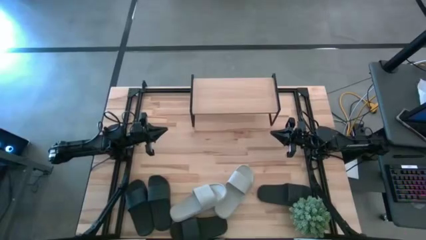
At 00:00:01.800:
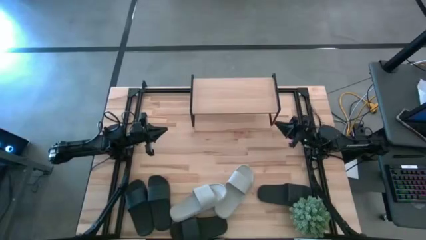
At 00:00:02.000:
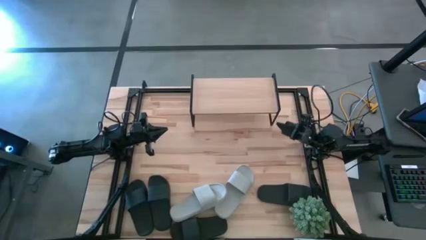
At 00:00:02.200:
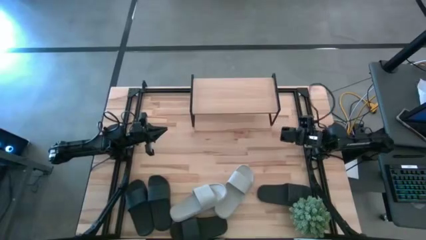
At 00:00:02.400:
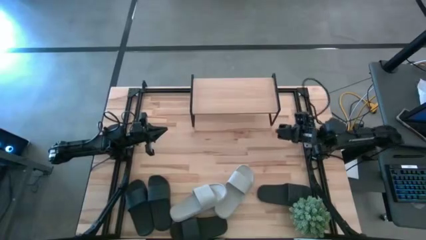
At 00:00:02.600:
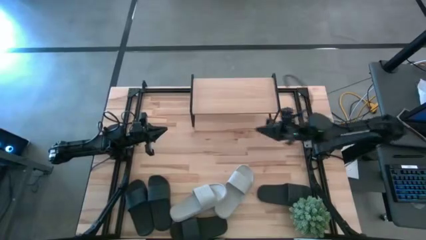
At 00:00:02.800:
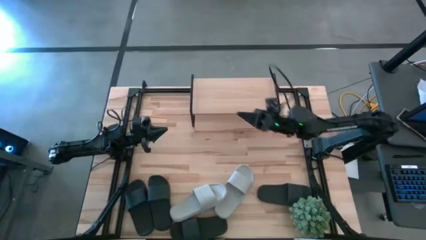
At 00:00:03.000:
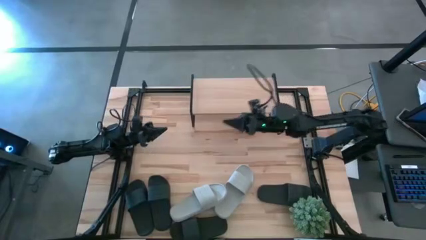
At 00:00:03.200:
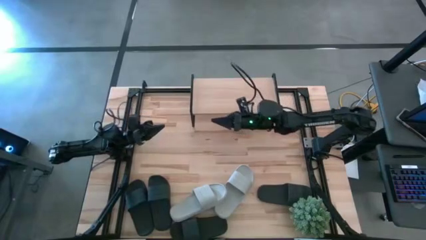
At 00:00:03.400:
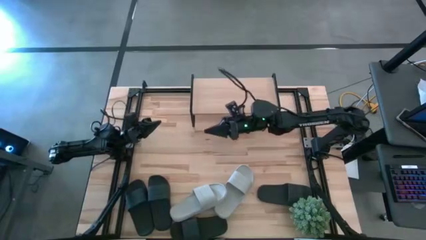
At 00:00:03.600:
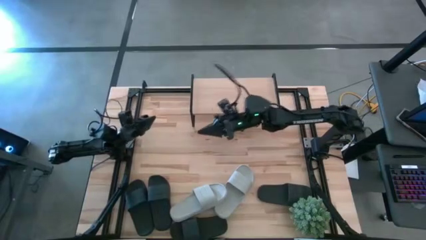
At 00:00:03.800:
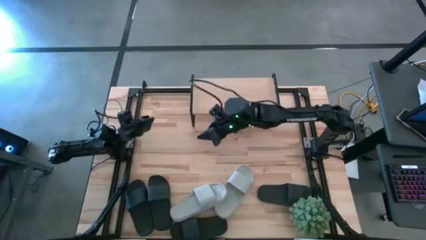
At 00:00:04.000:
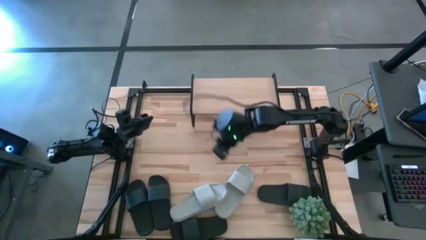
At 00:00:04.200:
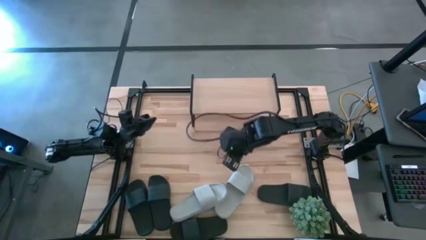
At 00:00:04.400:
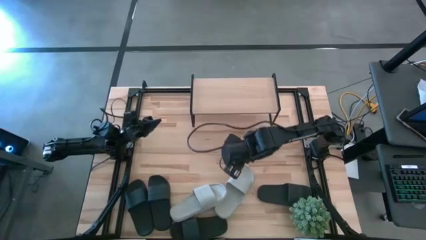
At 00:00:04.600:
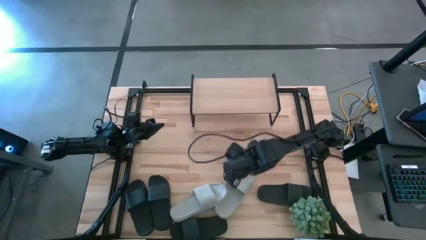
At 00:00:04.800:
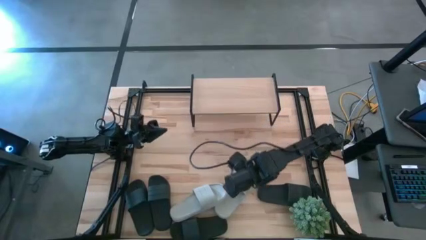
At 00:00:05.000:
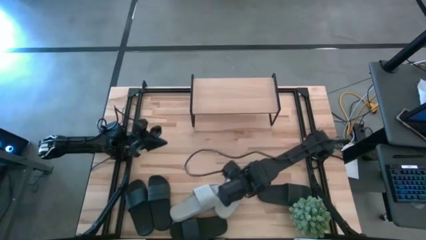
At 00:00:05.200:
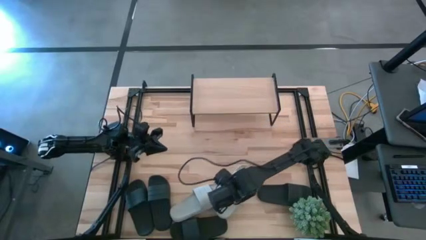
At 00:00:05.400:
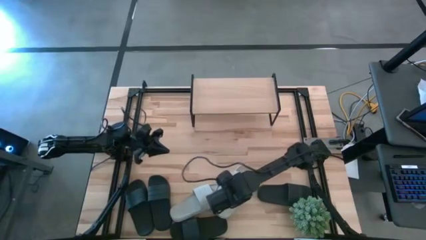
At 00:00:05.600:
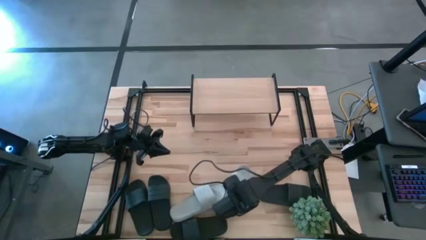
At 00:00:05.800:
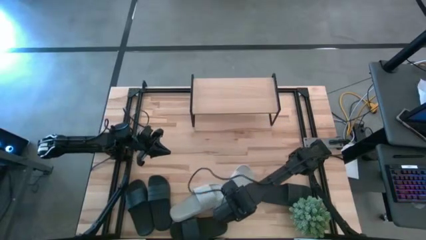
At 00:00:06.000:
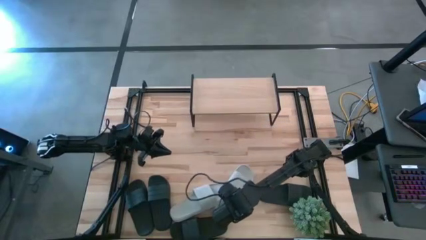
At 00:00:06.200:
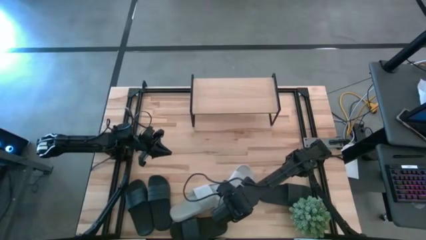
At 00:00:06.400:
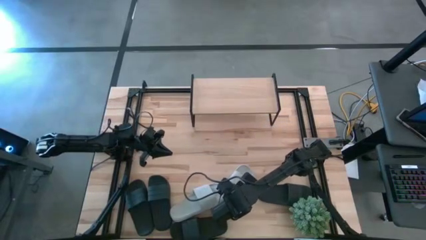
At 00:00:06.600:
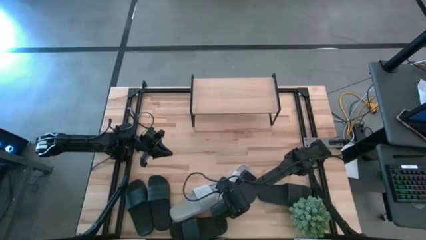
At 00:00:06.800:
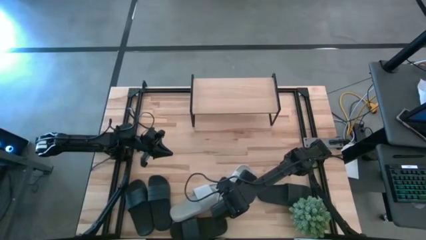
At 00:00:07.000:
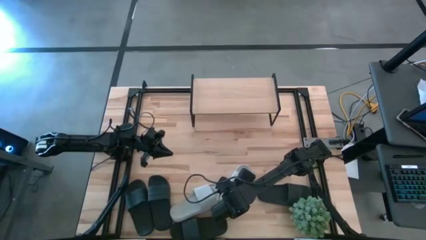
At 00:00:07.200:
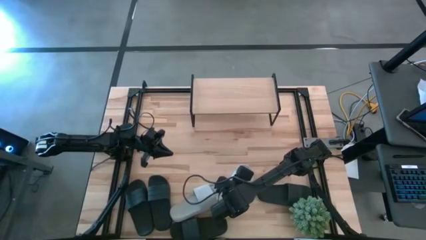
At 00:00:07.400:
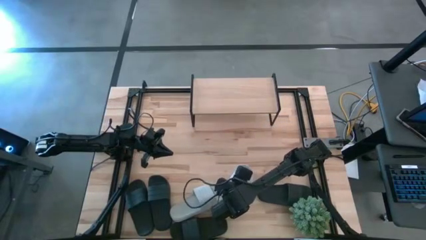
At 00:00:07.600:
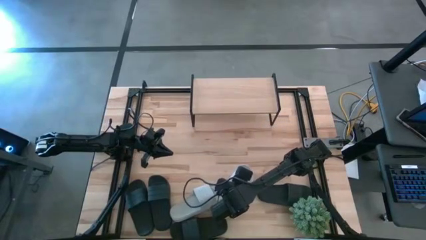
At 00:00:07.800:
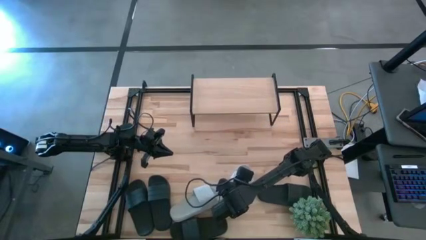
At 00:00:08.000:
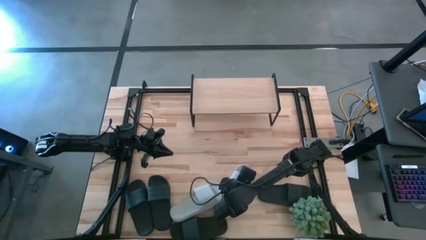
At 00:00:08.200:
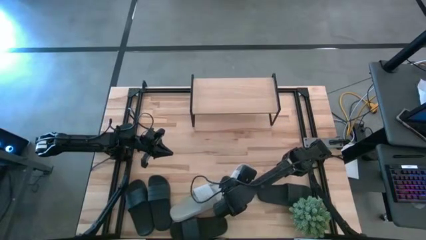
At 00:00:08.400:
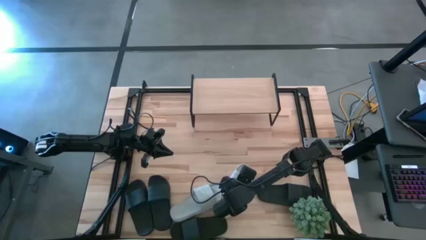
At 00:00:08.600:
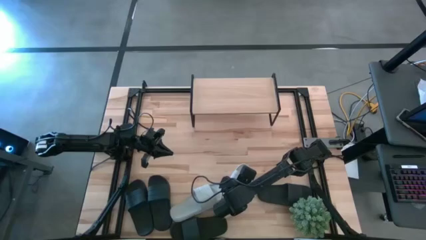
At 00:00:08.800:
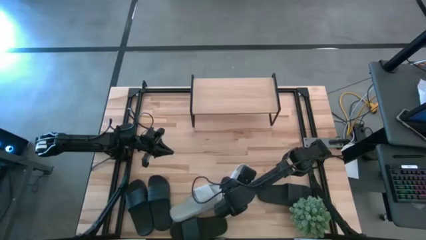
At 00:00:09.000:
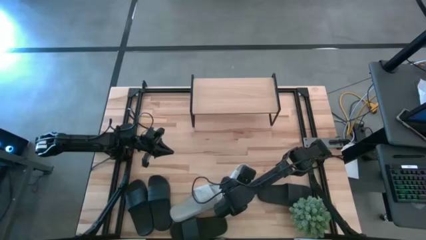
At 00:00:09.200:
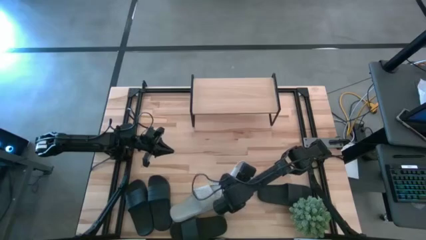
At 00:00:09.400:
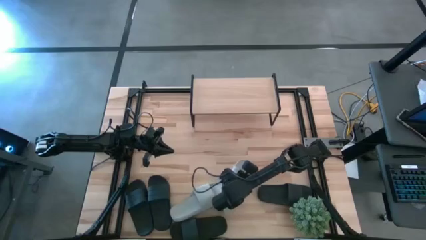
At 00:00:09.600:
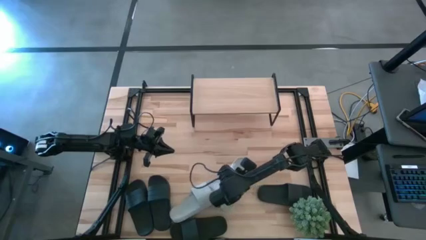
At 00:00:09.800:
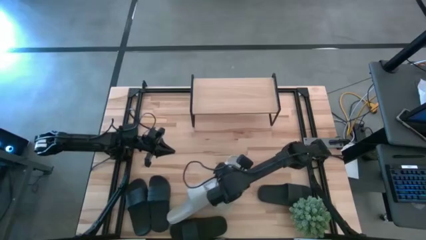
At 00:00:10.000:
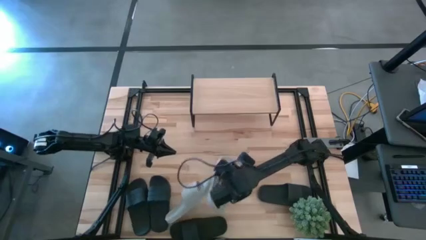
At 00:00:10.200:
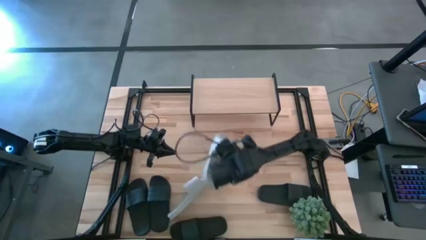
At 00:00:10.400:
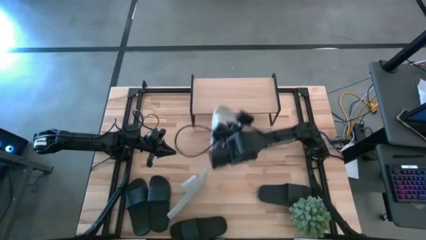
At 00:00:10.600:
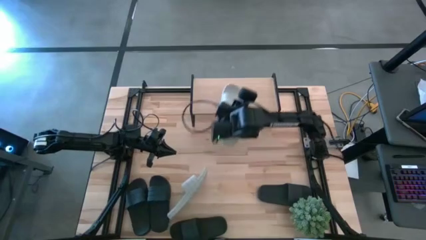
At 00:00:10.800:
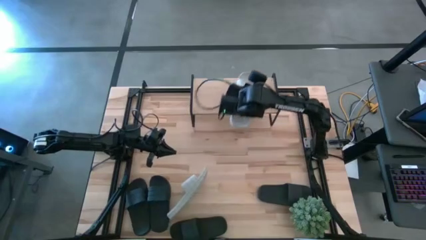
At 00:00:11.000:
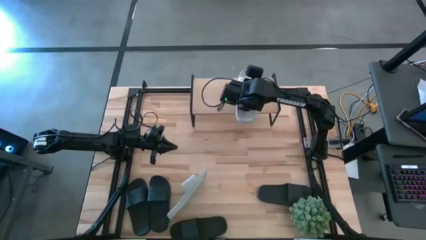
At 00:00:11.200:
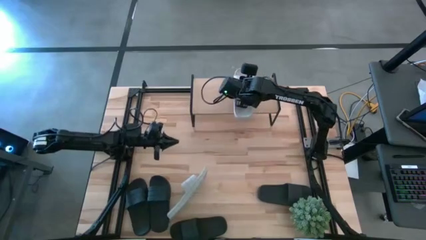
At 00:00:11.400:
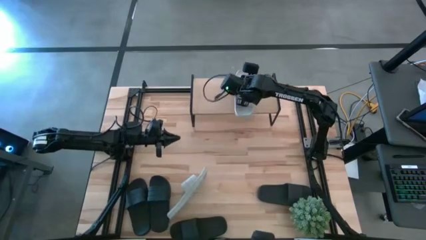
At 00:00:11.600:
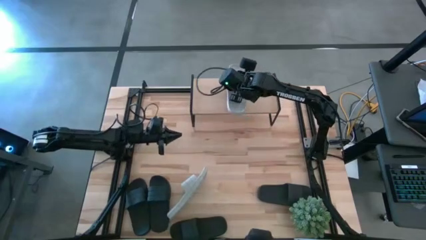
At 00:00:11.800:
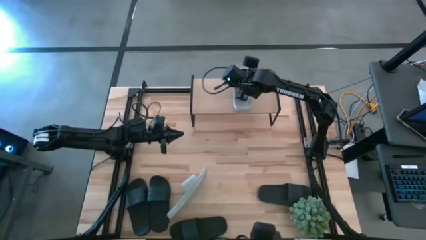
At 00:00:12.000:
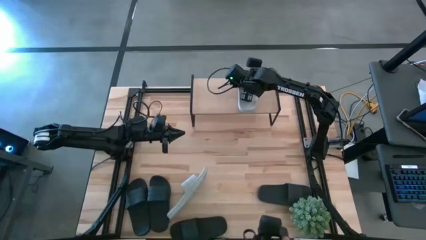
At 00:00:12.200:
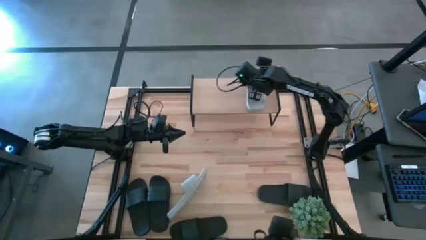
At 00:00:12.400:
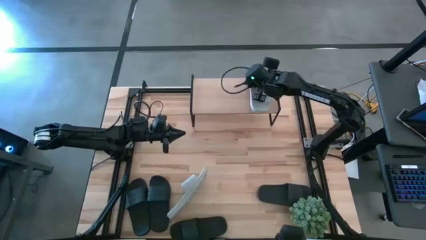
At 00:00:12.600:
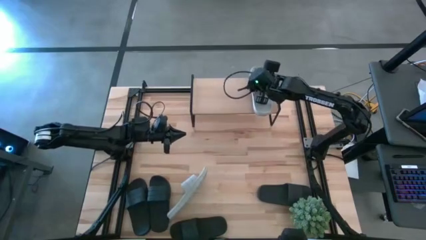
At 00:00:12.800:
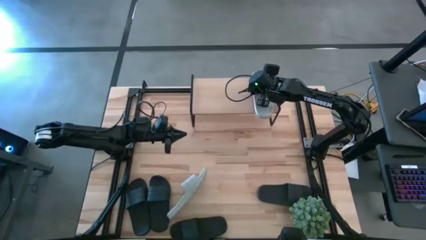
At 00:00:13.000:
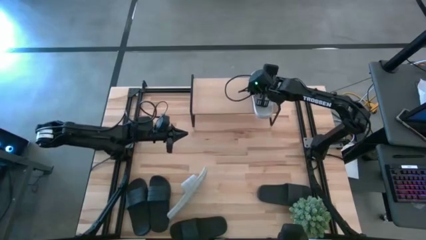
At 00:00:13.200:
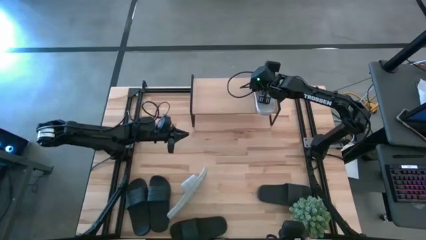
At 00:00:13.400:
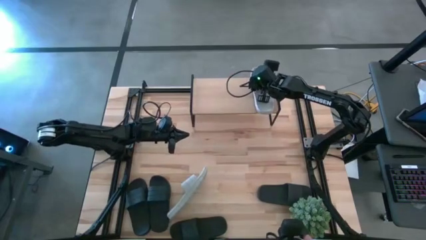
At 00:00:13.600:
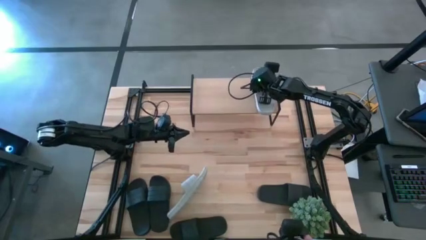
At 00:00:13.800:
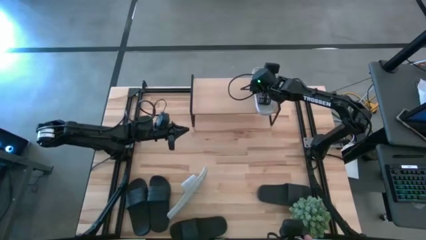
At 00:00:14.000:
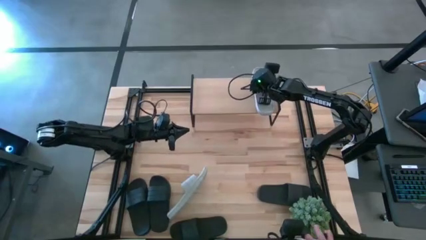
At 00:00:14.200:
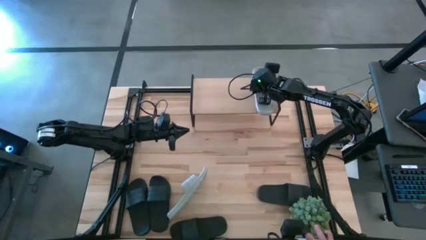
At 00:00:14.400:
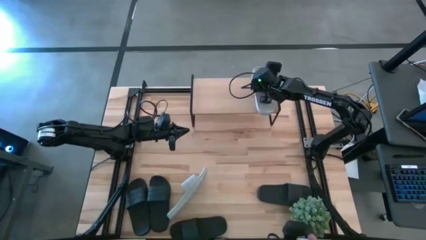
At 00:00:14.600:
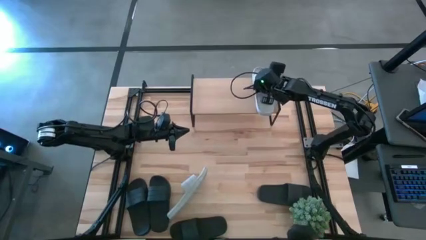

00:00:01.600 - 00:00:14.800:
Task: Pick and place slides into the shelf
Put the gray slide on the shelf
